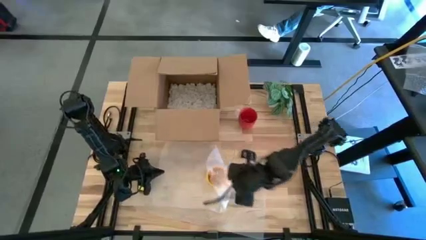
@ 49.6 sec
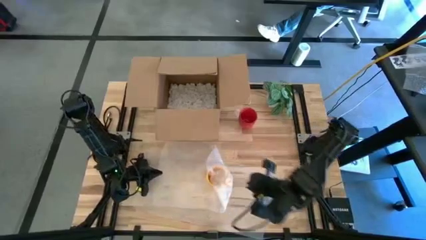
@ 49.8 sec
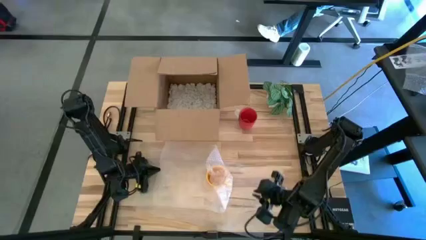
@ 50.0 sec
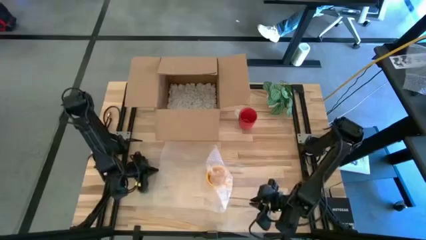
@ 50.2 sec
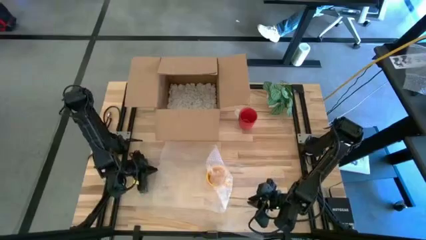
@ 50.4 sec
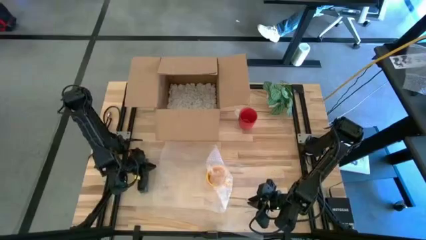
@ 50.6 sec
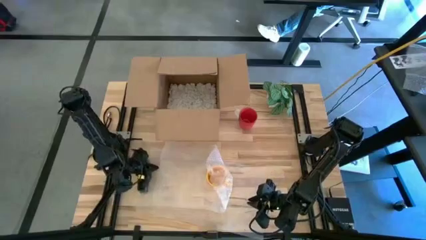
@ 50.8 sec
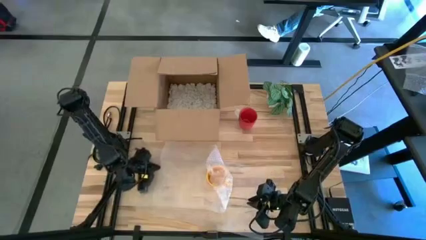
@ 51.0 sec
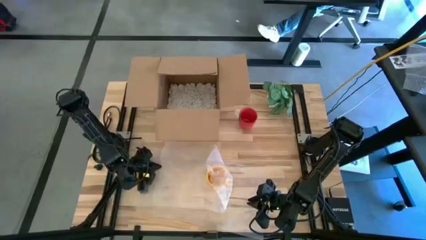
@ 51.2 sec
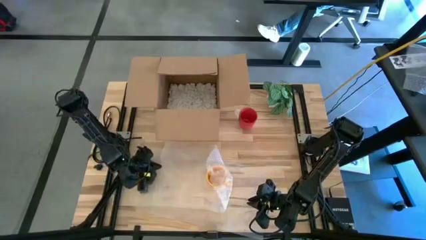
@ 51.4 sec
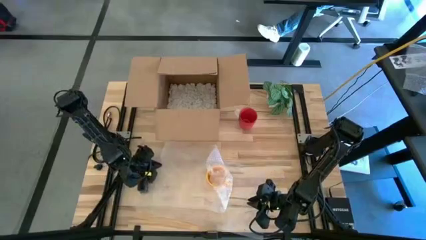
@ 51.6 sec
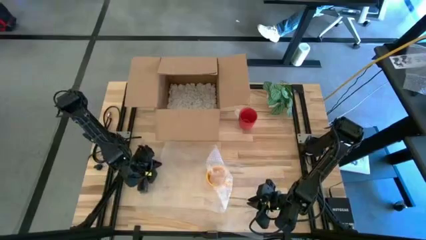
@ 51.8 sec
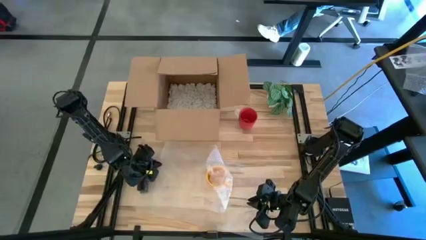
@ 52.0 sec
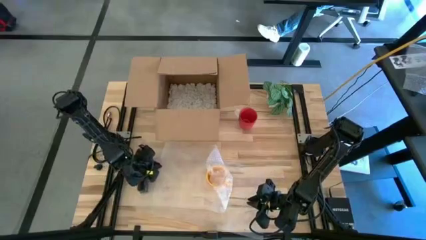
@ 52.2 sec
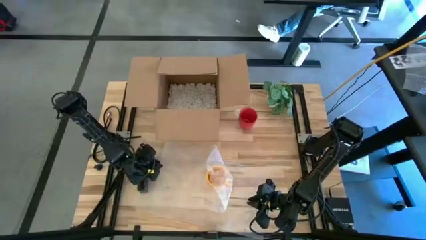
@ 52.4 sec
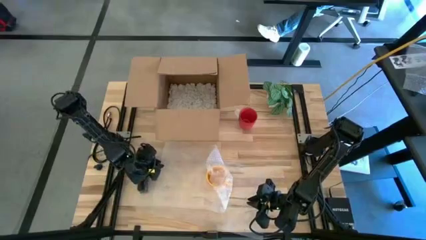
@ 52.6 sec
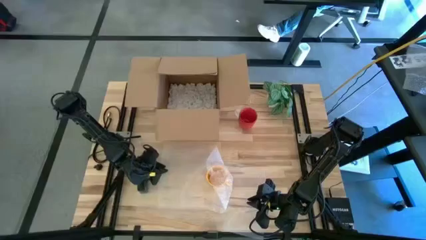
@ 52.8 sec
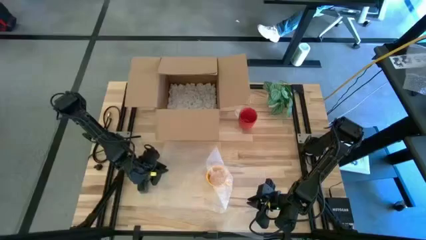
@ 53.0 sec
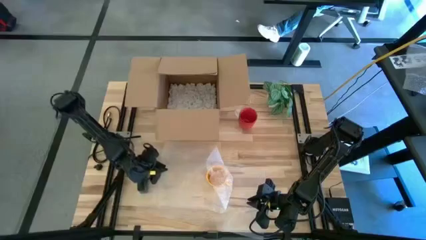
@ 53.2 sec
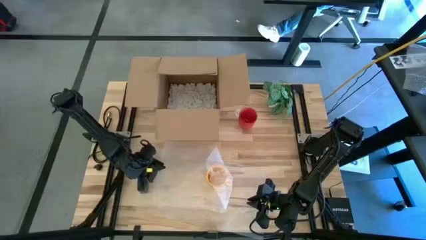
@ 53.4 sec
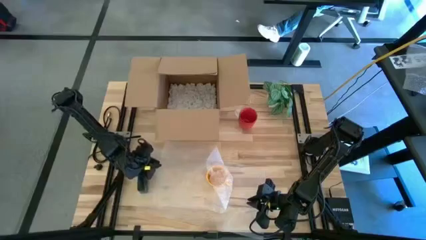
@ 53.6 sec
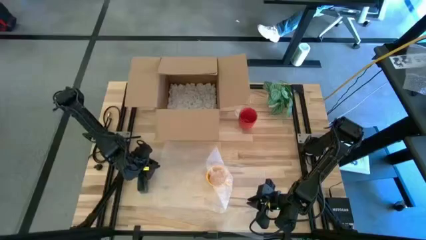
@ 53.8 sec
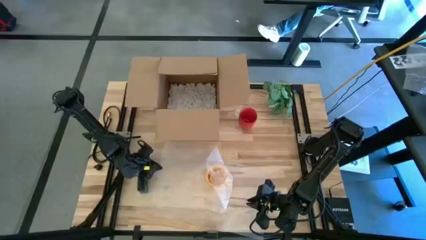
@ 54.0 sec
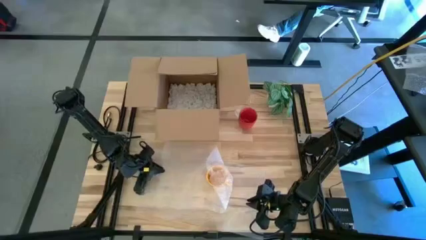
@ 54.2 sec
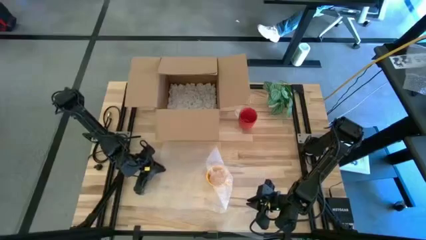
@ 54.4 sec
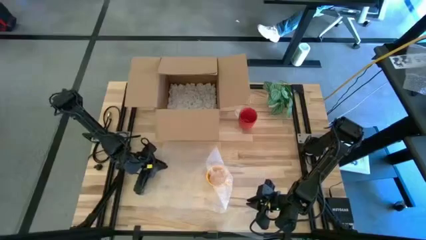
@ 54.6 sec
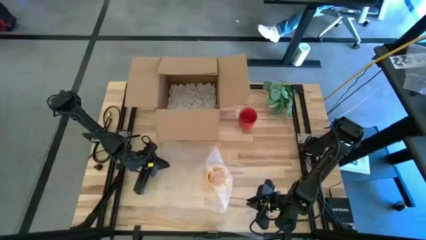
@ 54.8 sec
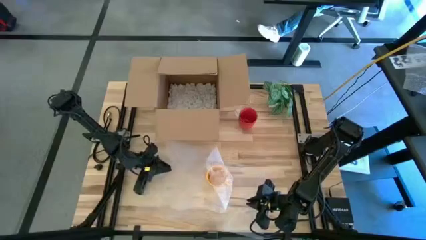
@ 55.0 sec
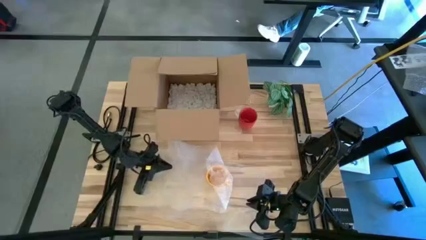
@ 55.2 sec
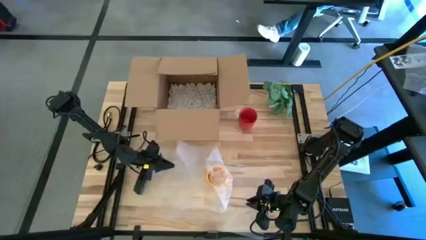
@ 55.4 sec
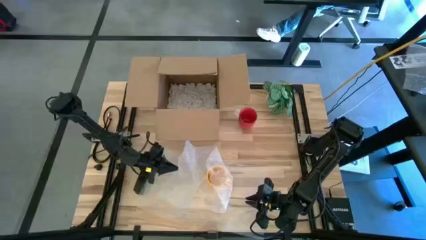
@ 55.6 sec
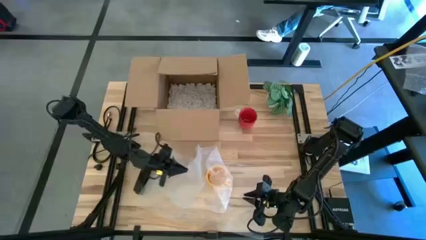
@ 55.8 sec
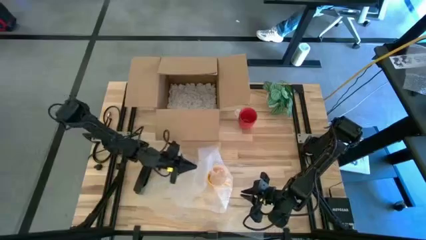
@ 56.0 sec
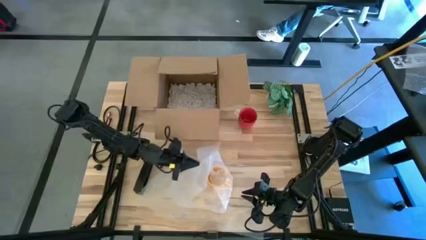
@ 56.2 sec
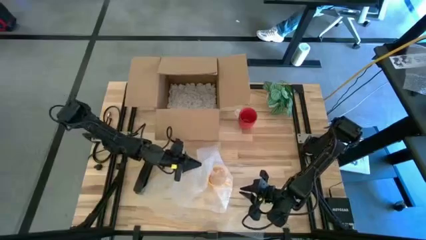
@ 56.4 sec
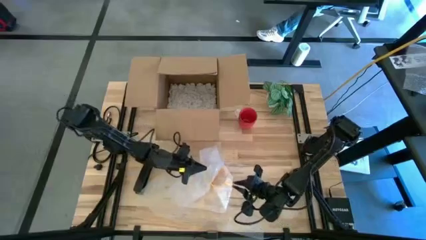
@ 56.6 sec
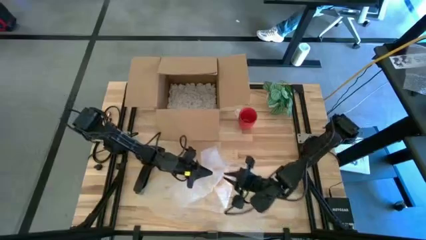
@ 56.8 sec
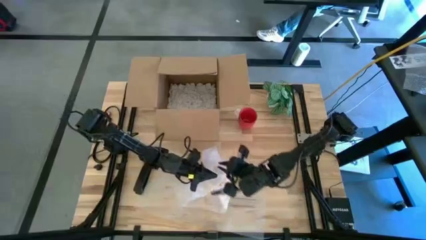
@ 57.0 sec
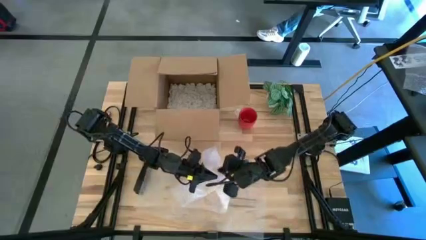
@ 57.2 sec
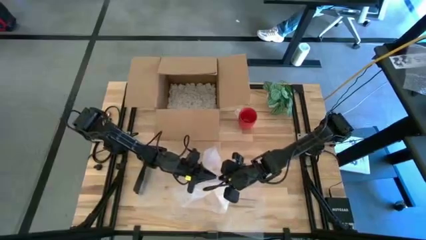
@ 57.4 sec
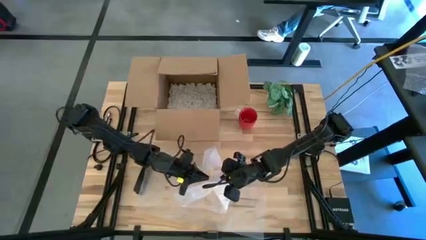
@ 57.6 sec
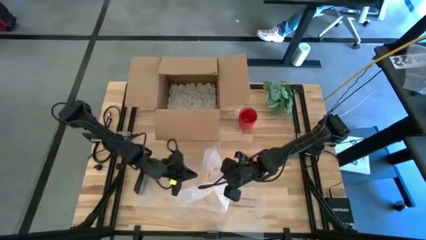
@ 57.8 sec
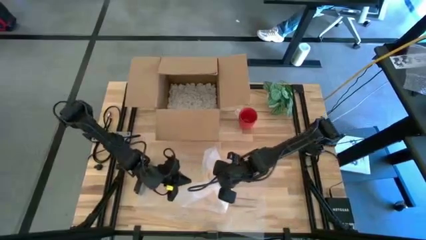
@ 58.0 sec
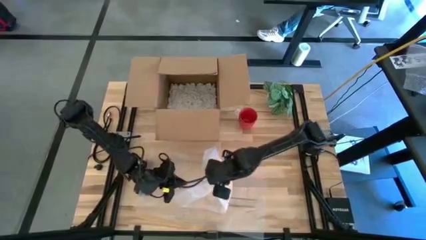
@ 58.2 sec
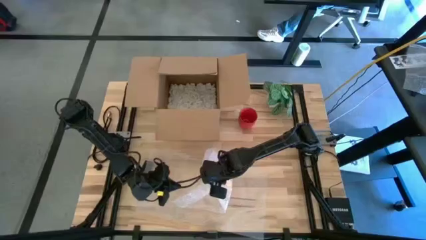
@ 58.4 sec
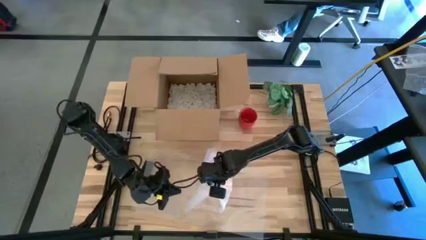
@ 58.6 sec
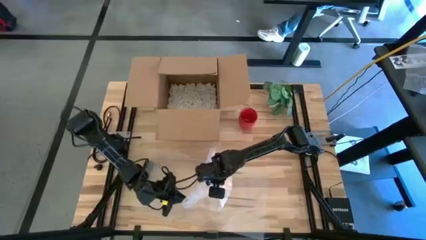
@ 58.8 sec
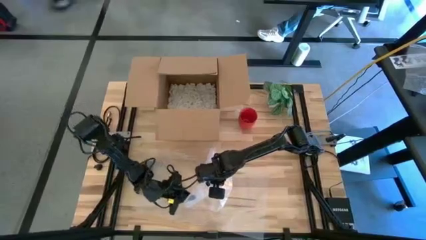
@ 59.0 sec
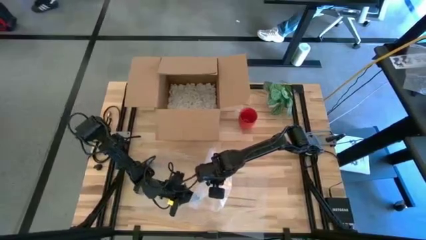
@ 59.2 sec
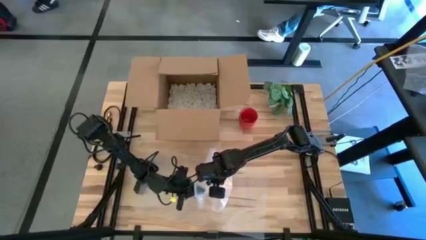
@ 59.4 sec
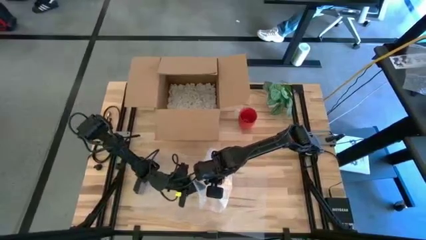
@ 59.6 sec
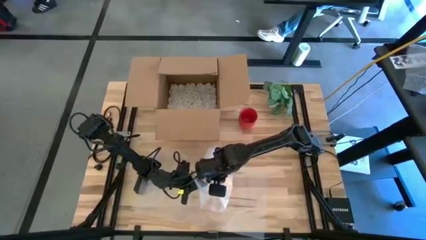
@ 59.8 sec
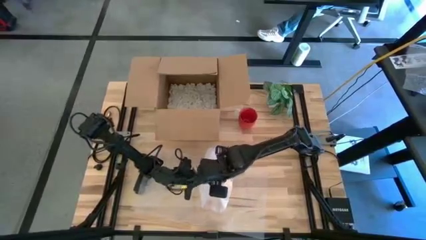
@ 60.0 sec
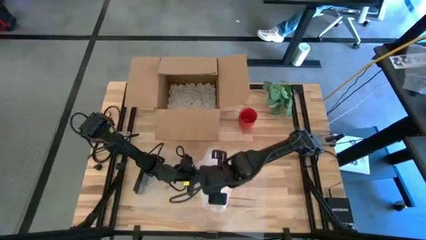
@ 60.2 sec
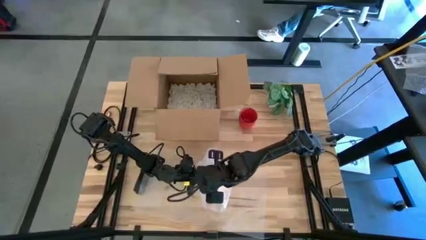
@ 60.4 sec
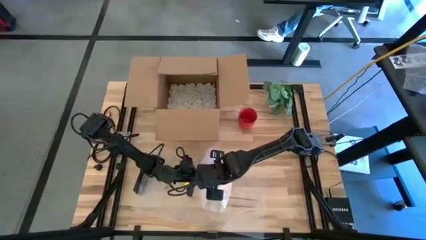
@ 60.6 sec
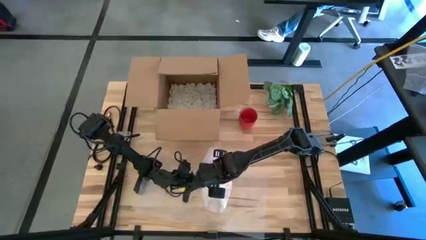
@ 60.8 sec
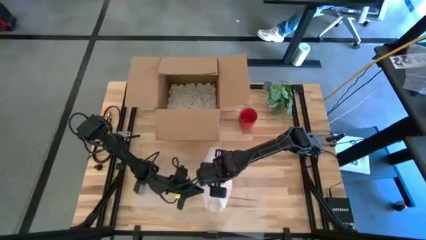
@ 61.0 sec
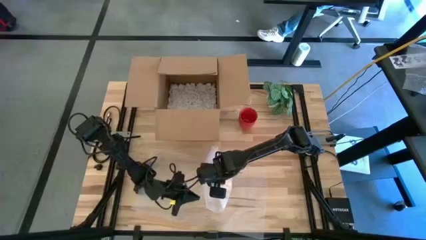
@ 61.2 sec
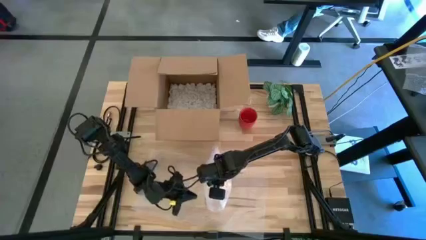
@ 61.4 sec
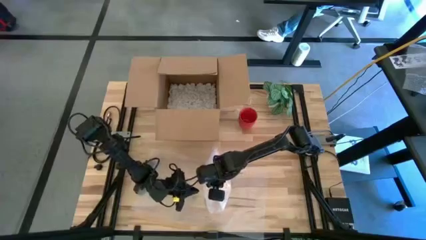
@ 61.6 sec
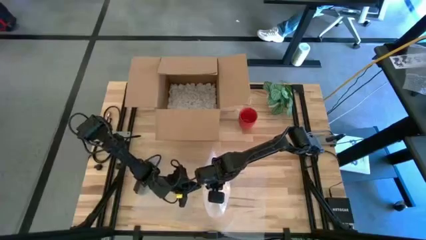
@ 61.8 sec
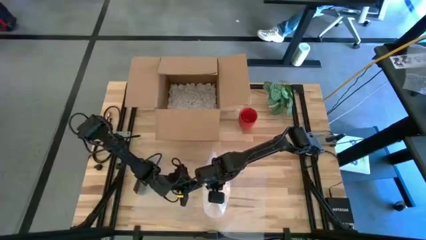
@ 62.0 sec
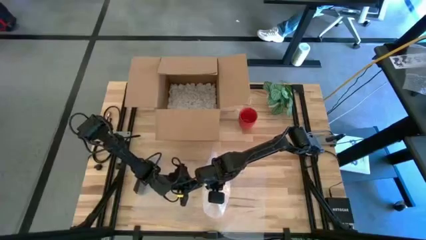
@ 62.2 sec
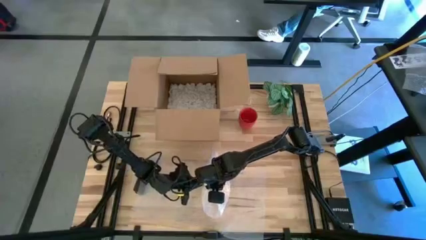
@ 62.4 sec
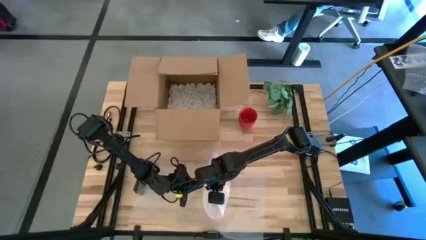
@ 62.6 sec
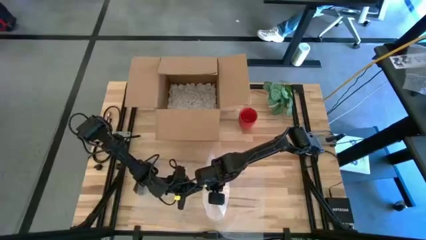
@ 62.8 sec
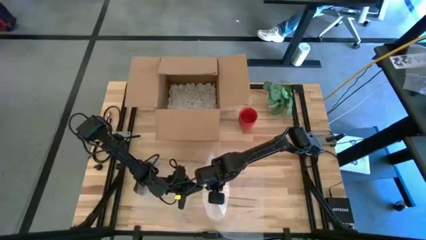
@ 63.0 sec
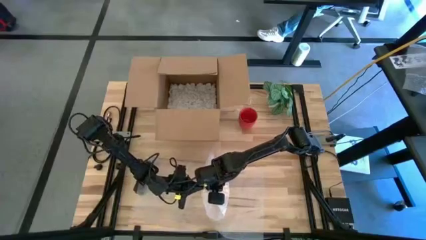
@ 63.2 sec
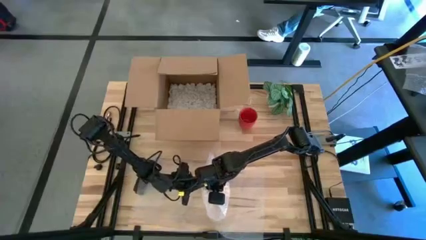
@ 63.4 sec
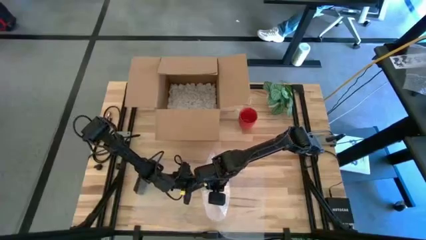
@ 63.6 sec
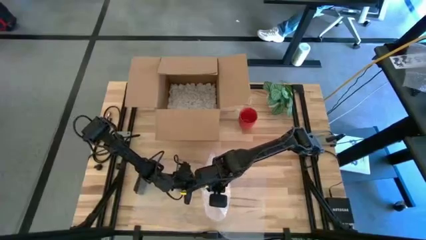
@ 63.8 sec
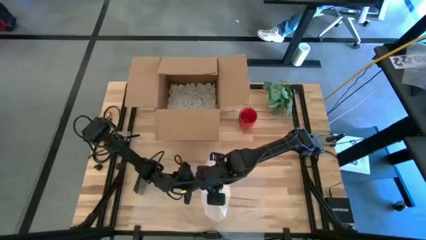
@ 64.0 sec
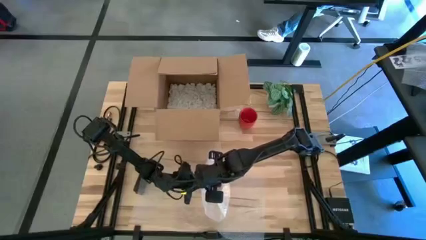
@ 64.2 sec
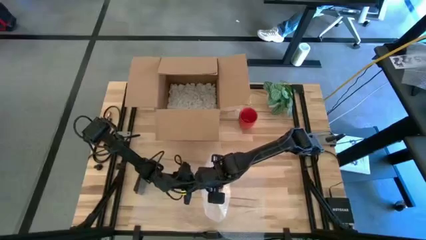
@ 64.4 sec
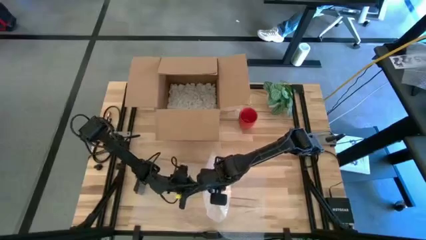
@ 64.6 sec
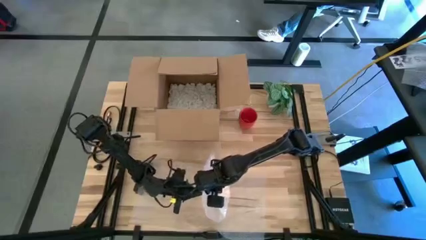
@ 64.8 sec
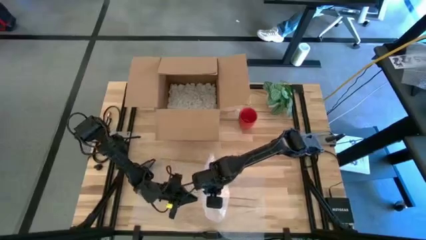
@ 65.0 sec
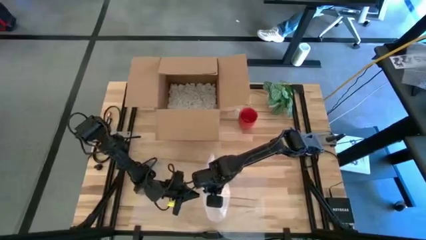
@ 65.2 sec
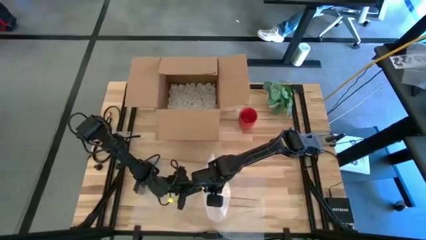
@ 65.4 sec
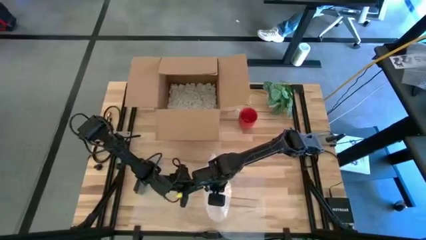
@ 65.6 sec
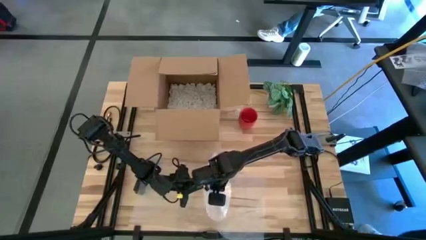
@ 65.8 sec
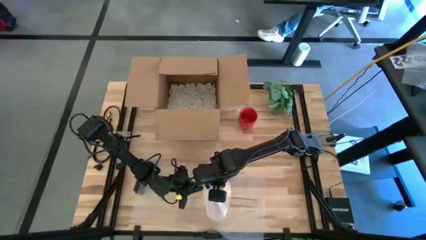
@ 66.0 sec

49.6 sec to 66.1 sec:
Task: wrap mug
Wrap the yellow mug with bubble wrap
